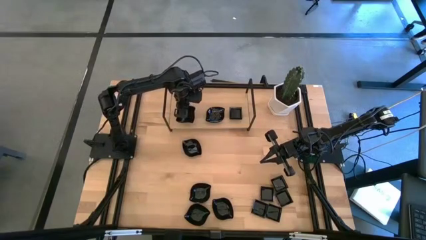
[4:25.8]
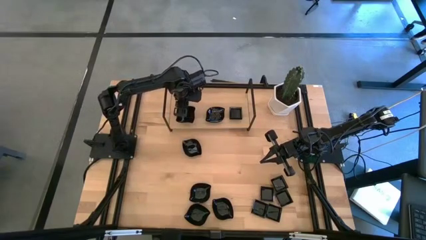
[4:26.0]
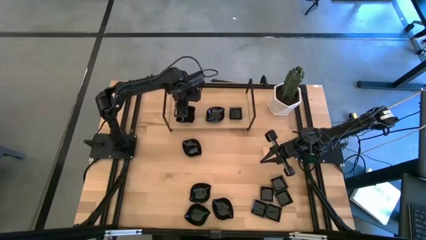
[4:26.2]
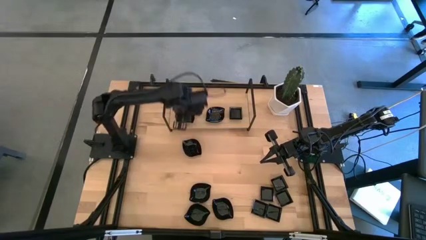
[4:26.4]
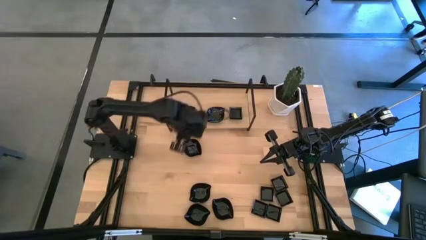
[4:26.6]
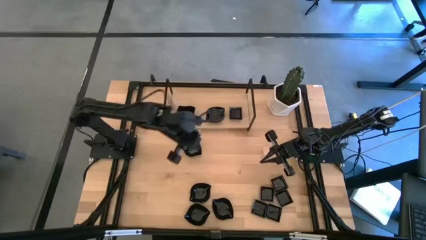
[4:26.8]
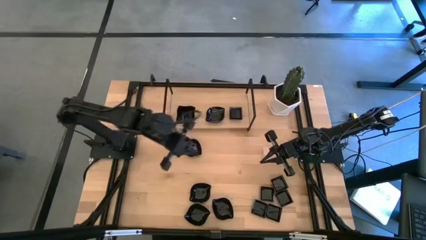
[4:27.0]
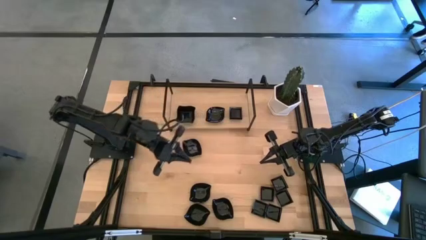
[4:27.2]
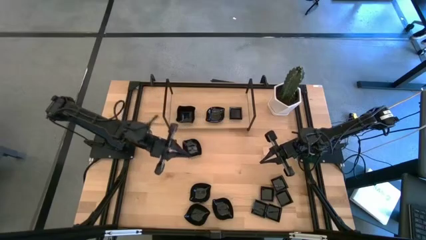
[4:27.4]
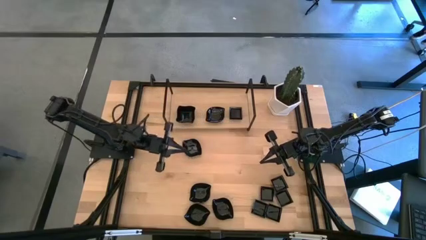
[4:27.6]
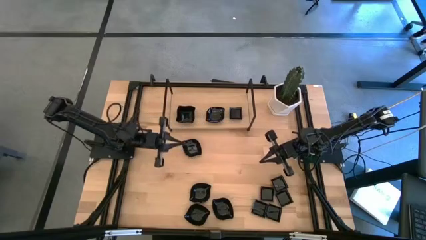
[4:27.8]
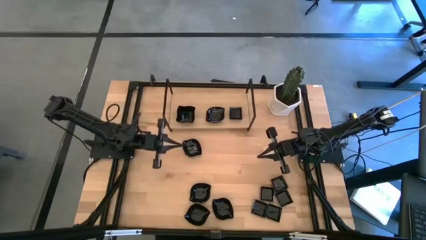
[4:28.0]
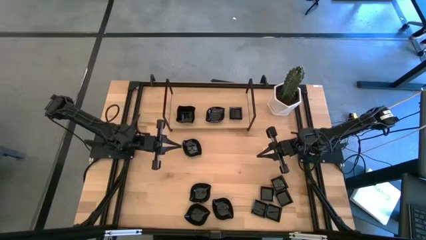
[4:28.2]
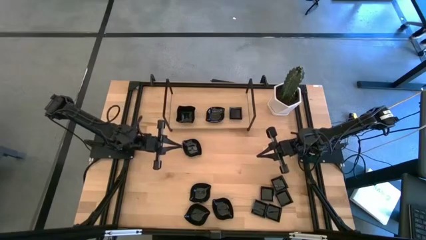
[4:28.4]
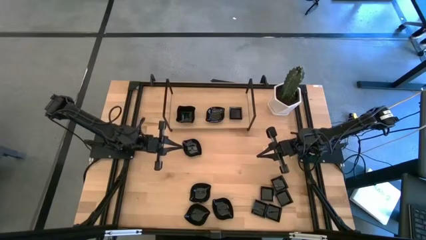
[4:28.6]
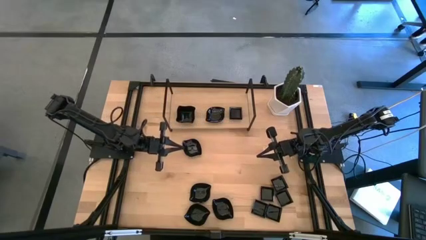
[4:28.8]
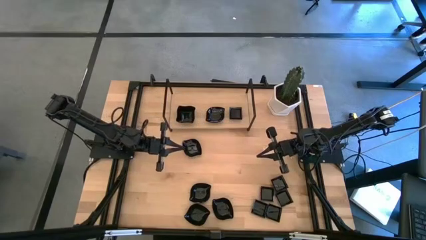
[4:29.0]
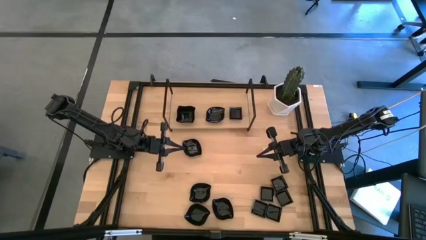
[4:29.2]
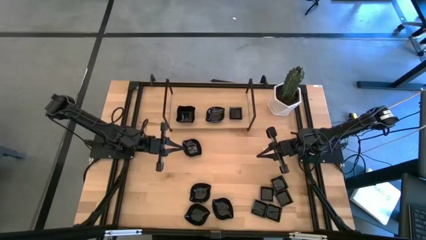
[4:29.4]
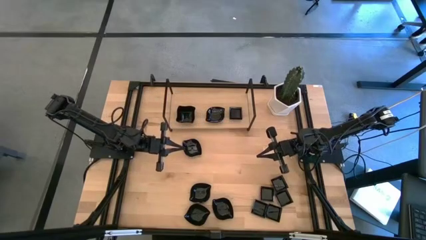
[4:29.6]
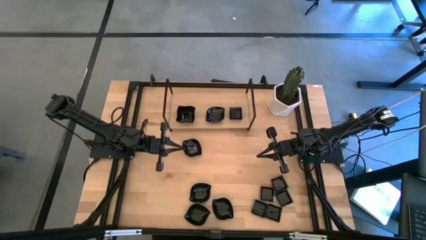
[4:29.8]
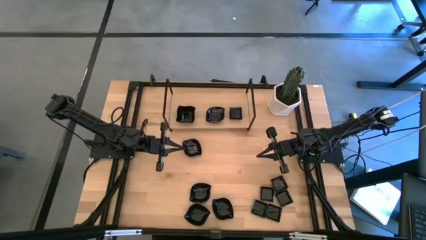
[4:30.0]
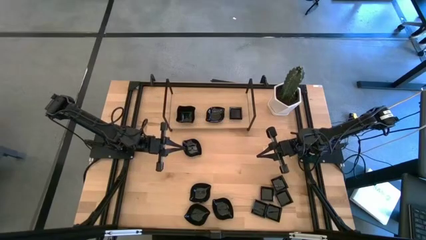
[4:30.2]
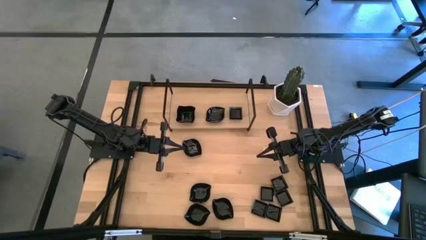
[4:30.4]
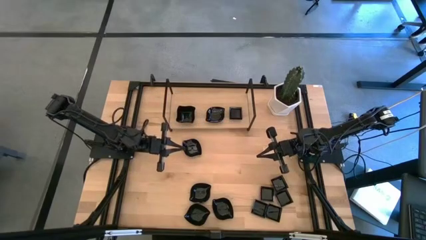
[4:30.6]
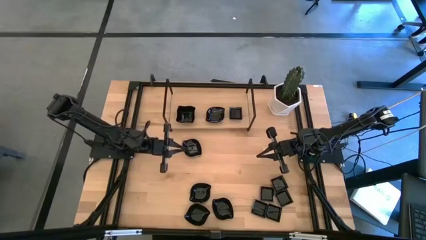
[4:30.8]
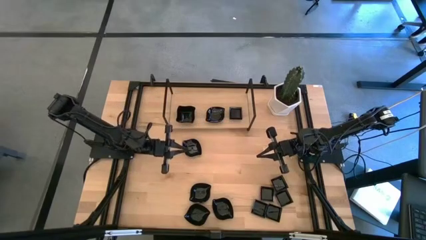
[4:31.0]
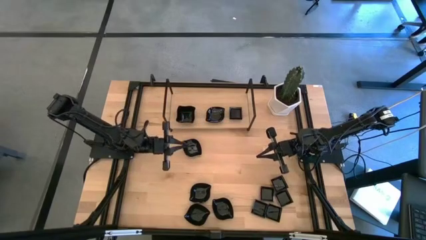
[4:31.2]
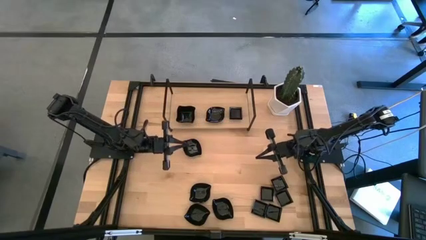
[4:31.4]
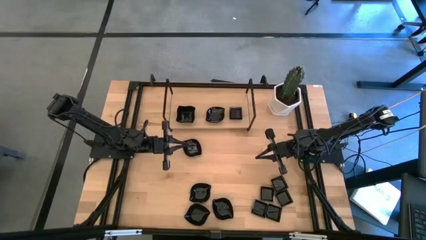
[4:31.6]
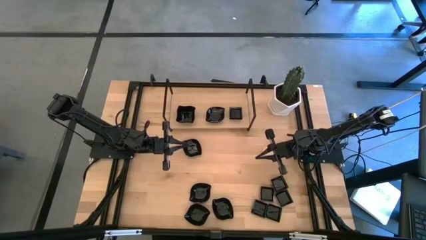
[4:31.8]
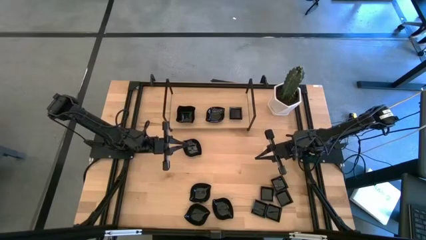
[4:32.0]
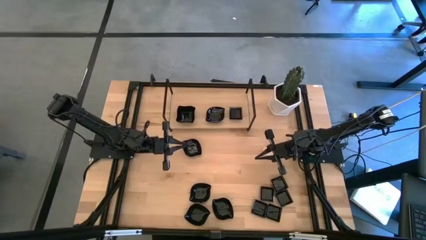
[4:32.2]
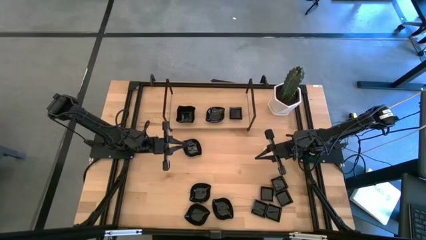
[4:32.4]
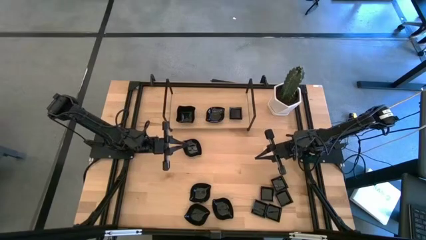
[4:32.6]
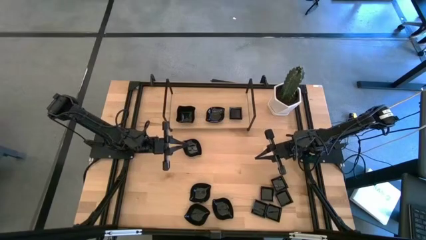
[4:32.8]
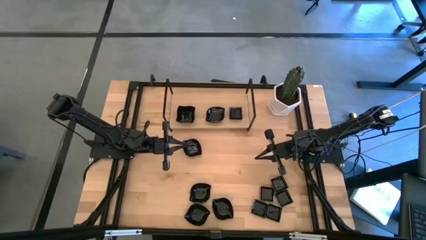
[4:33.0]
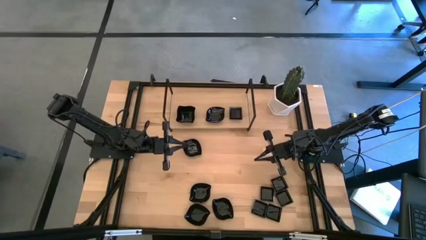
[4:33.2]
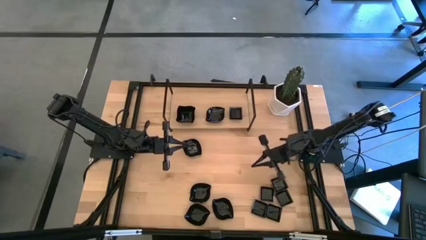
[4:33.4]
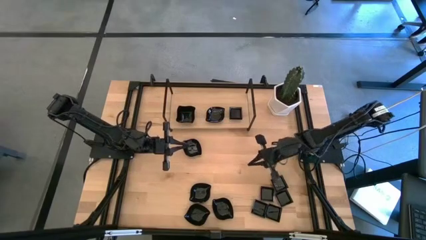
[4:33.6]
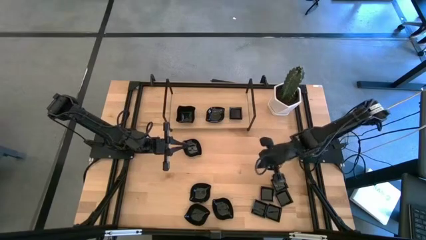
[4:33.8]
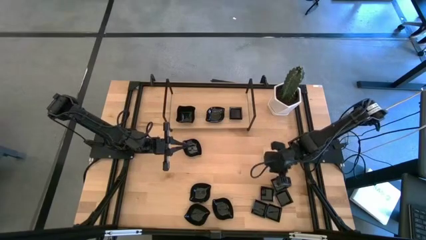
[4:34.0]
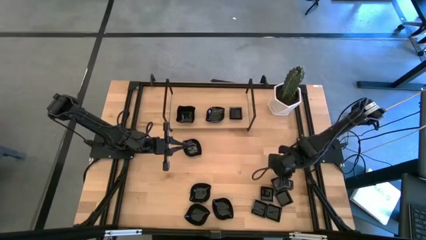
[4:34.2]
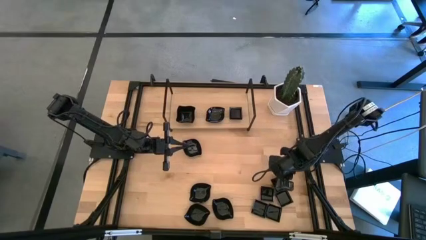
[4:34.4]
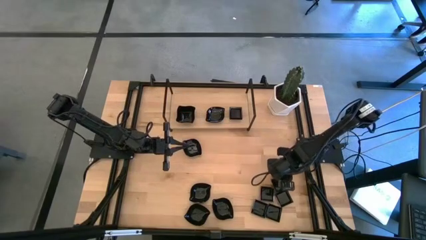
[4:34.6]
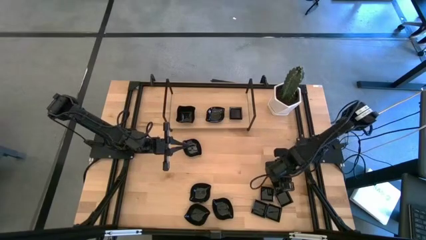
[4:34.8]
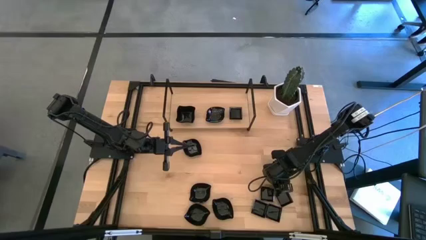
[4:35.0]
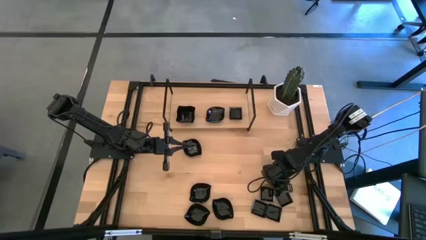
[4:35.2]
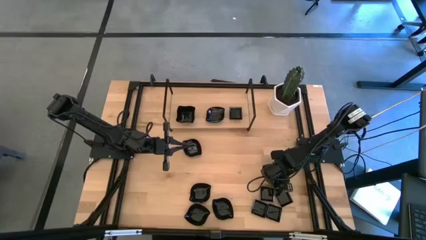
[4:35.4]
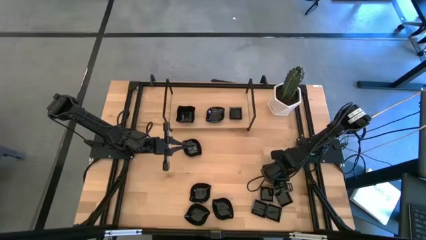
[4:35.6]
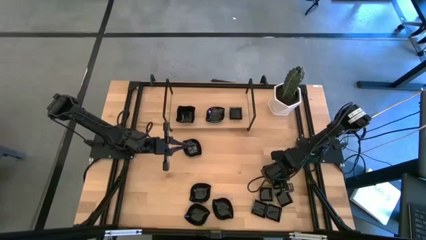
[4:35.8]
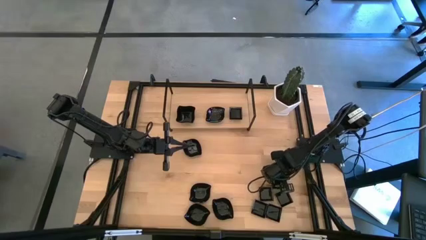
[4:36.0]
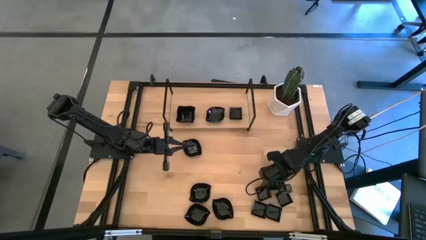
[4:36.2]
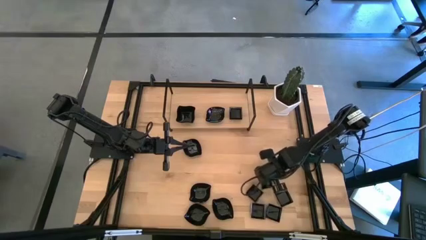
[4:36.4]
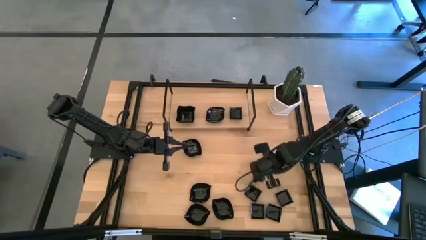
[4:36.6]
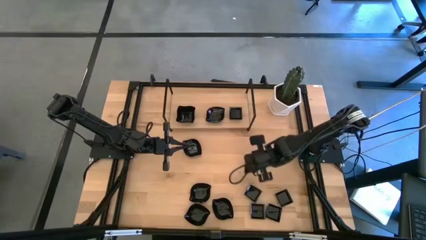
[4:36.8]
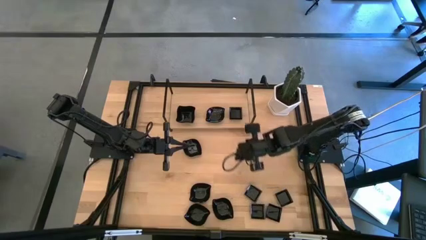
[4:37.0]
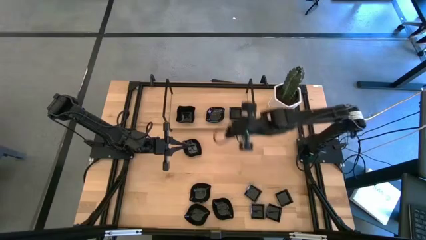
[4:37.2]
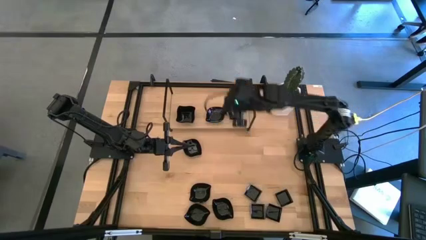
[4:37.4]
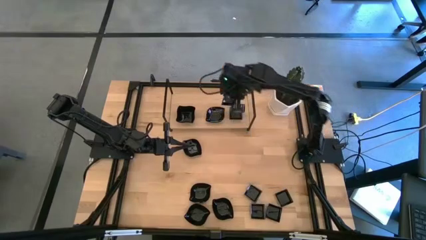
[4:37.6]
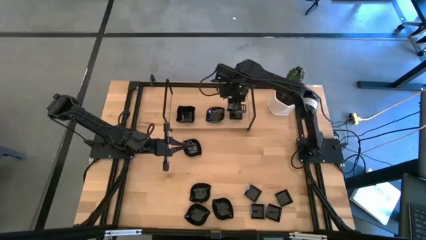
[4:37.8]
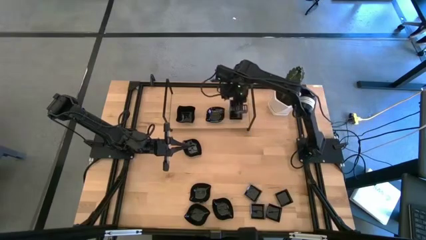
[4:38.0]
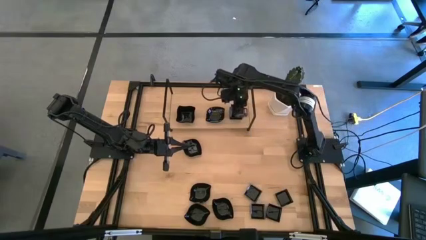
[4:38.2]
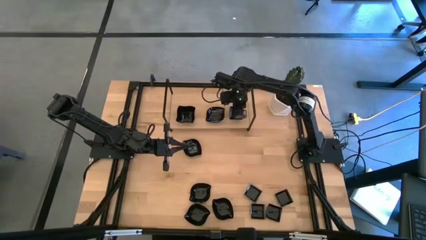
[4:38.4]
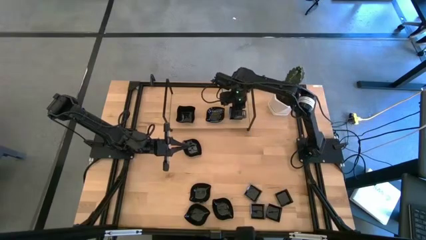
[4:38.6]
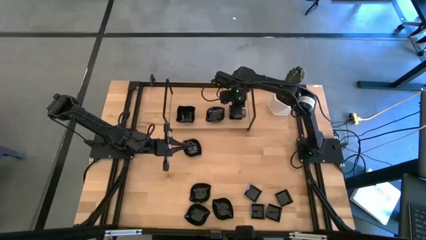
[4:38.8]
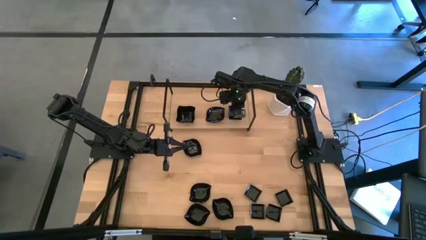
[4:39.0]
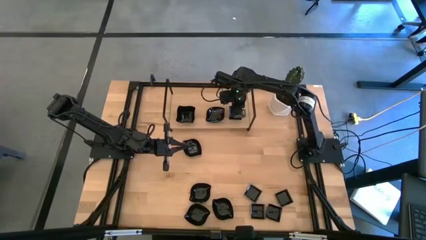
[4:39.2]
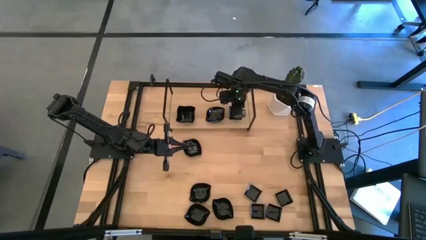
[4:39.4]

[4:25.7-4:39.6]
Task: Pick & Place Mini shaped plates
Stack the square plate on the top of the square plate on the shelf

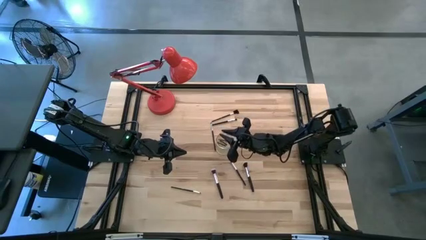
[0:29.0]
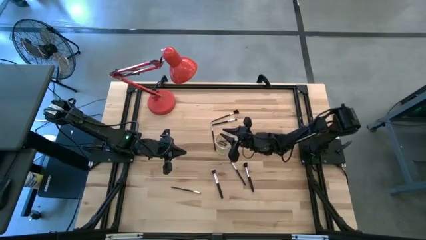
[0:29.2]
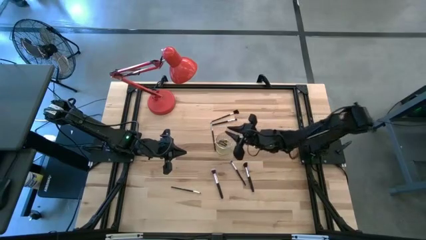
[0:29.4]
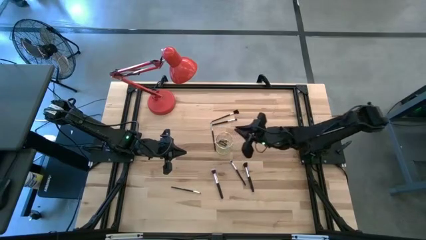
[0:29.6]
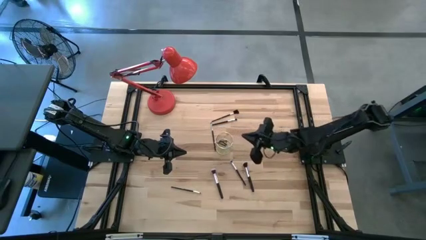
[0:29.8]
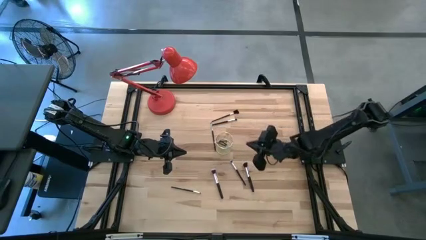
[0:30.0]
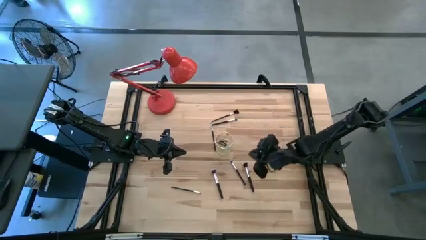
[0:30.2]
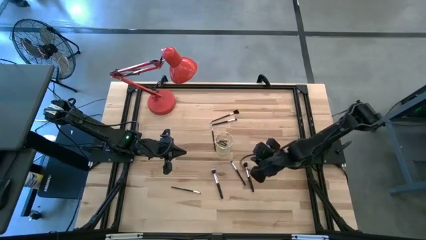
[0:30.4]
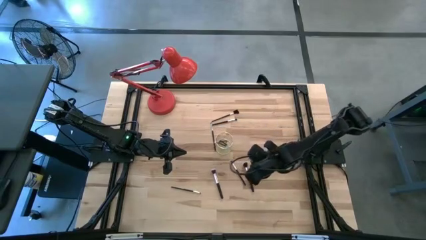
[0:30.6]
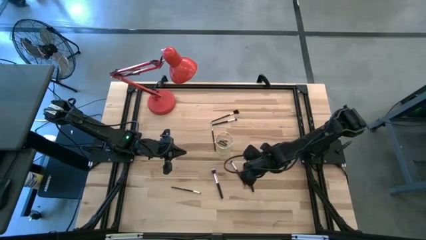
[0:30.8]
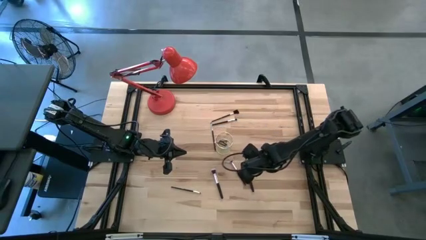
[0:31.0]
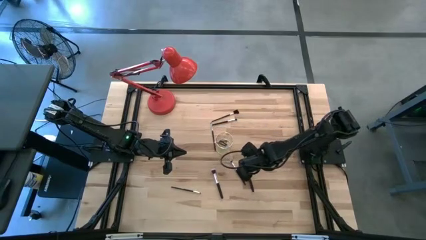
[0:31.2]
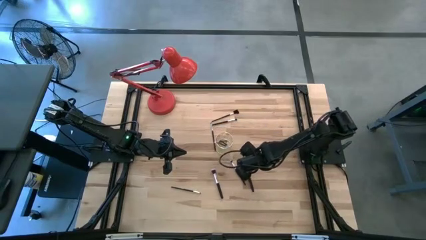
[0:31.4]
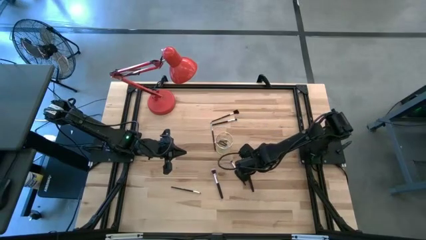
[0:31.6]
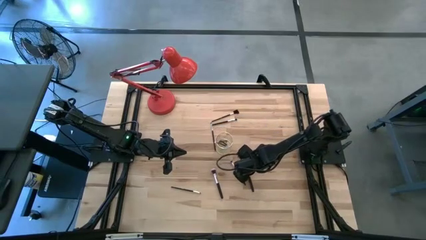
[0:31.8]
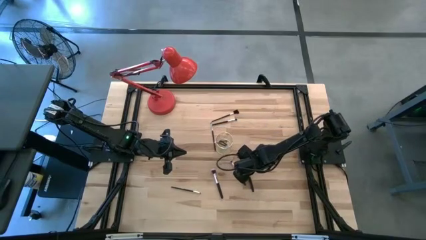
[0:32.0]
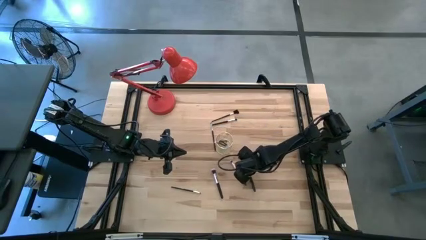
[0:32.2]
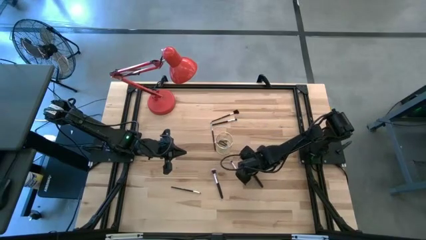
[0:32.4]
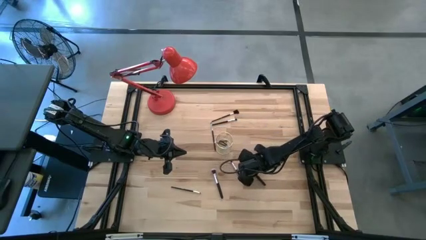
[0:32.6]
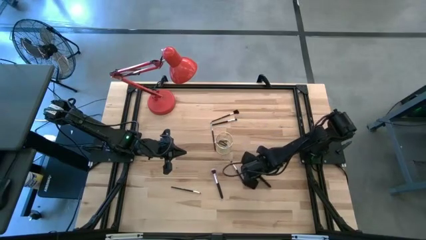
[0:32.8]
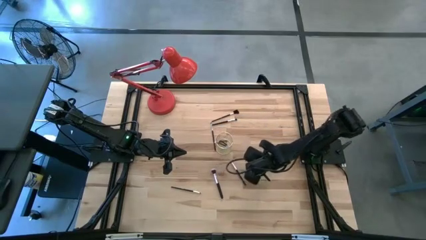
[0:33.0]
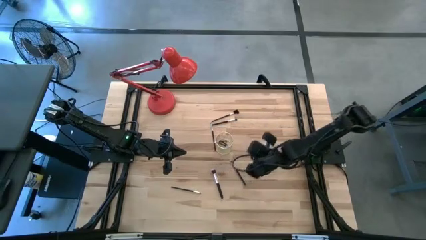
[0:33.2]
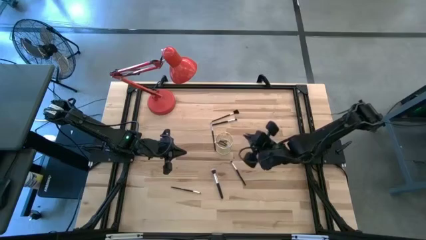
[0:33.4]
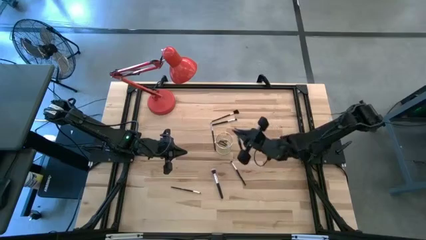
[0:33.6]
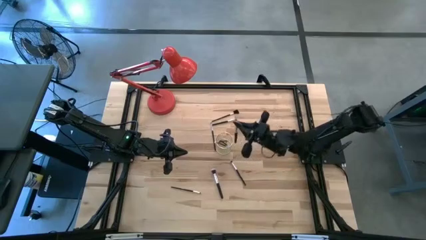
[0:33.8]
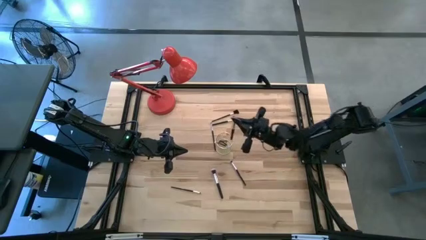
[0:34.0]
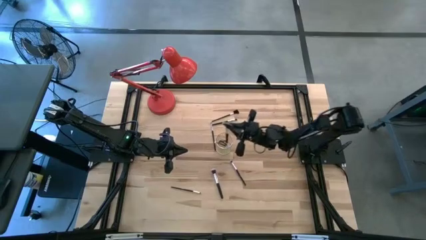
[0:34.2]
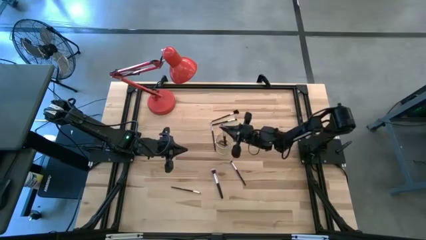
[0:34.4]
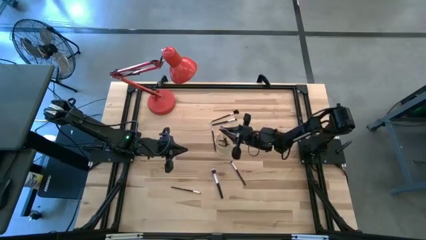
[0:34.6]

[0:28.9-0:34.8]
Task: Put items in baskets/containers
Put the powder brush into the wire organizer
